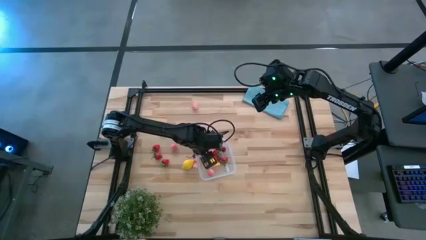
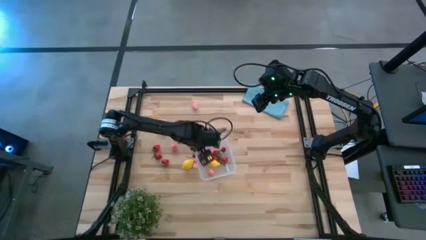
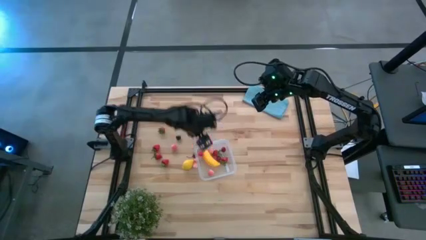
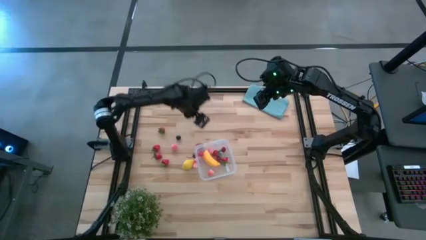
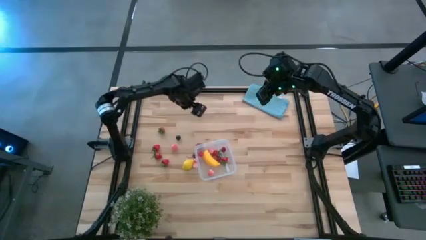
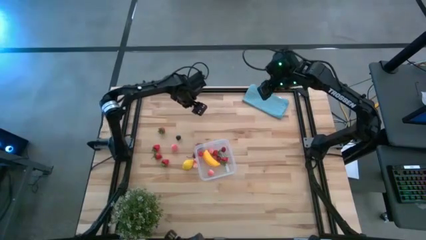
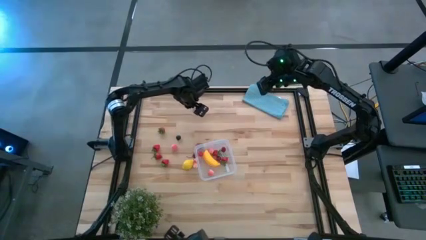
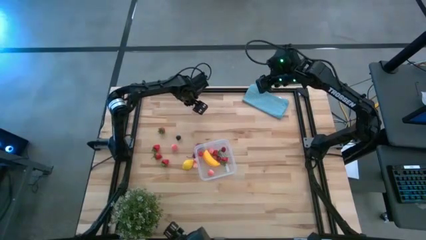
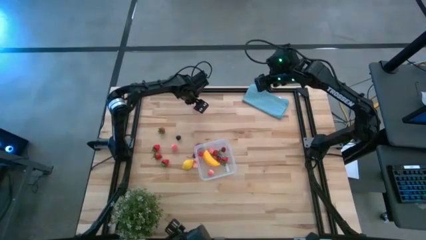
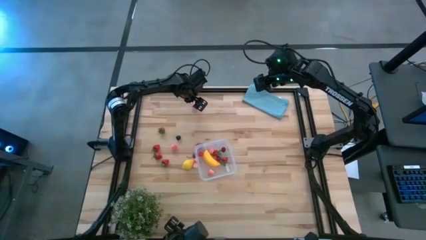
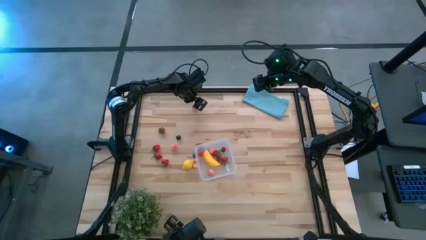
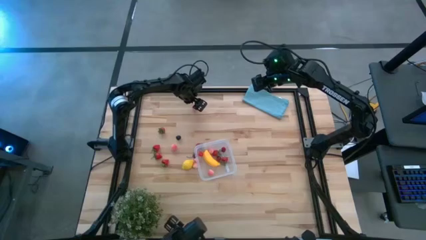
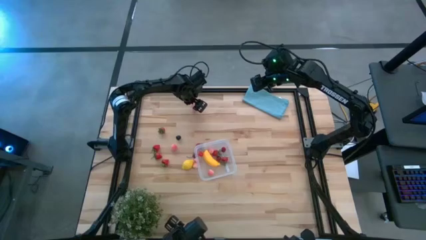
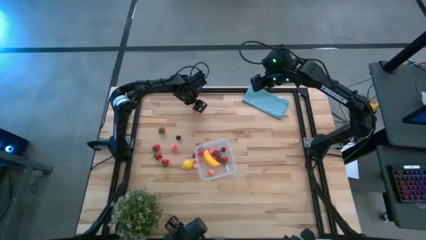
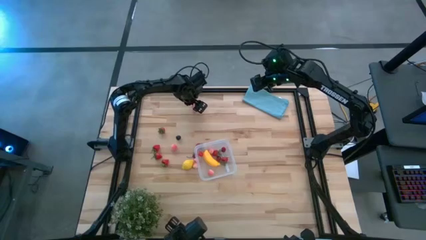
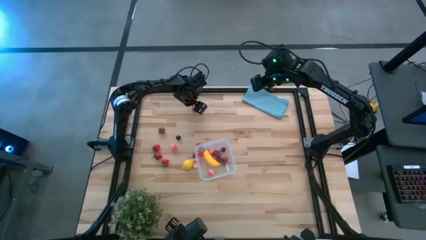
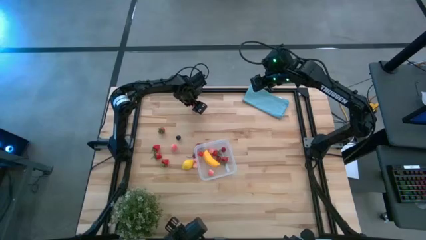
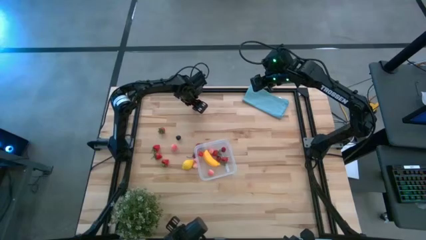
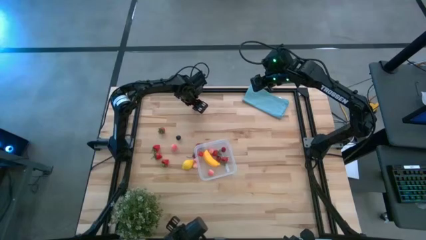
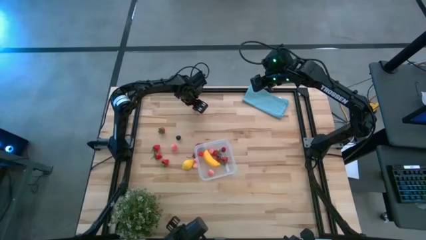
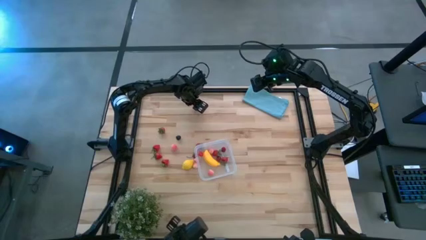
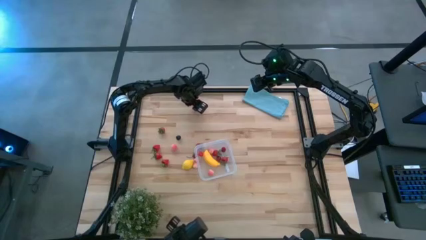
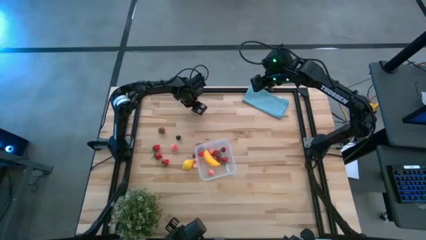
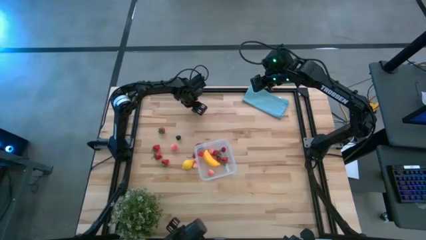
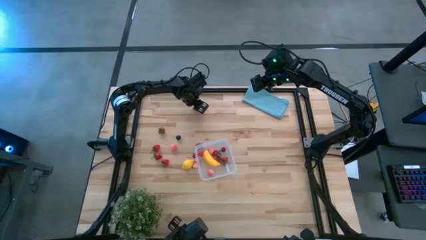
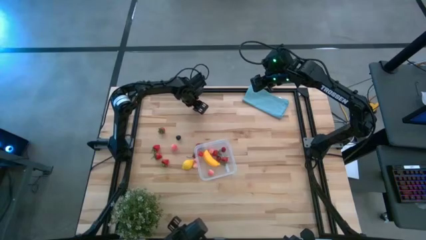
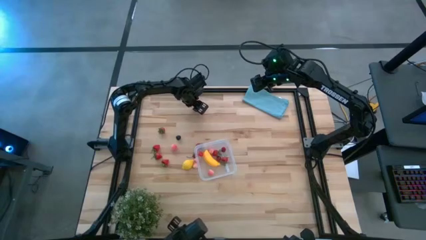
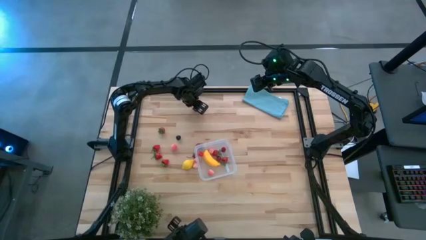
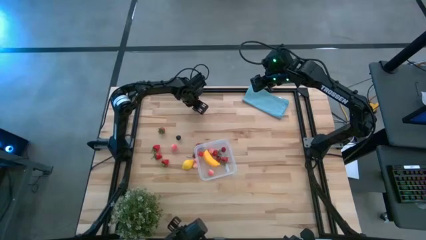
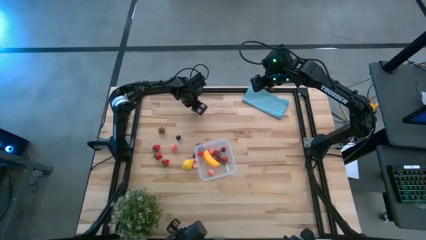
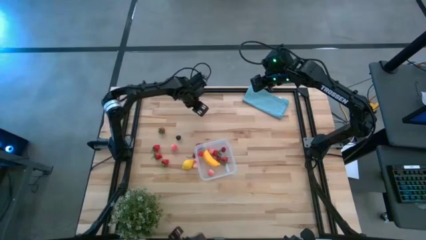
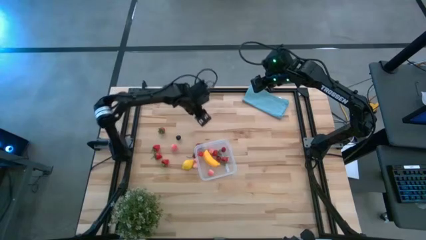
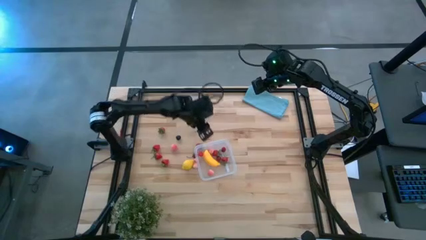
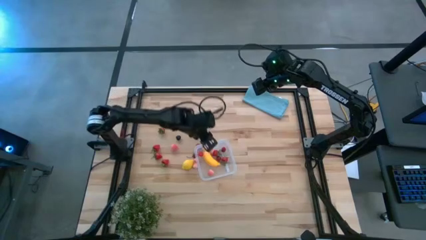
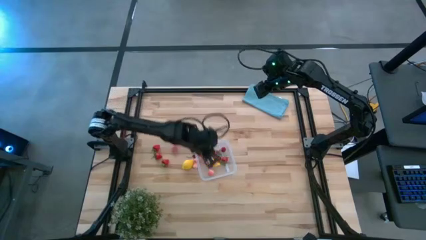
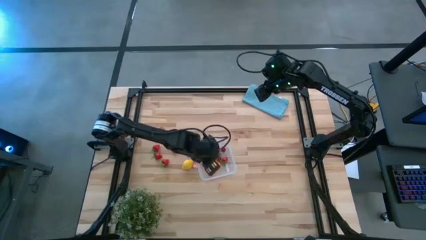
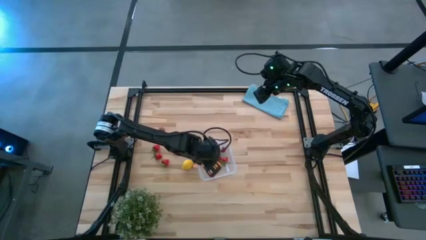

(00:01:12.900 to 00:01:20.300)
Task: Pick and placing Produce into tupperware
Put the pink peach into the transparent bin

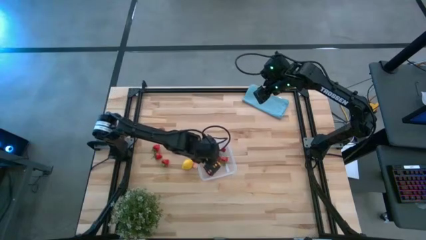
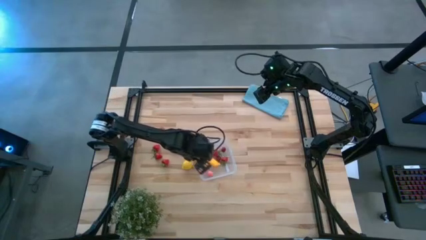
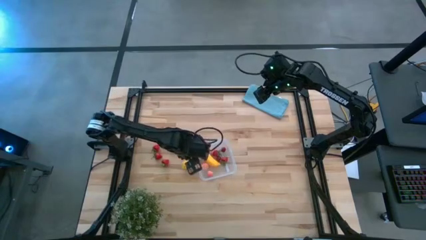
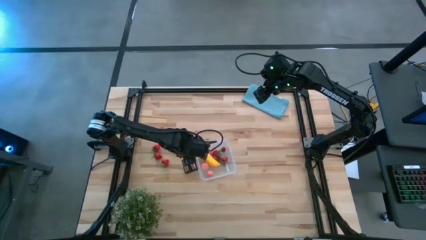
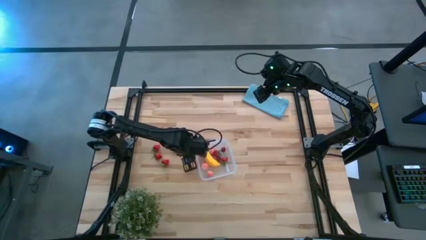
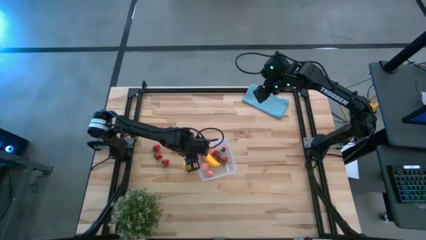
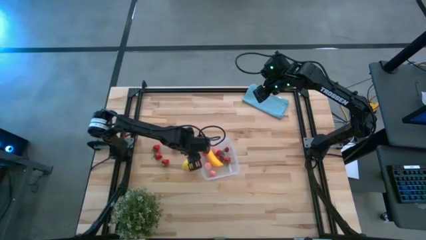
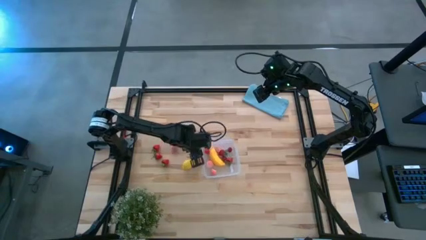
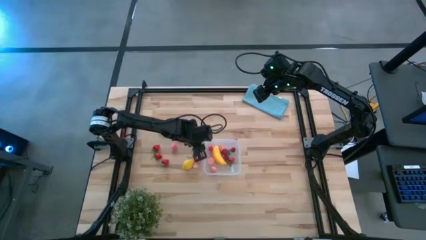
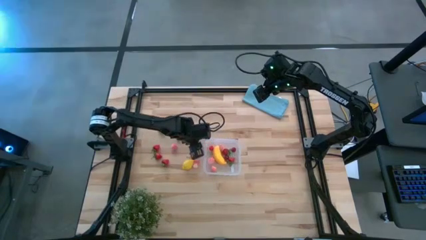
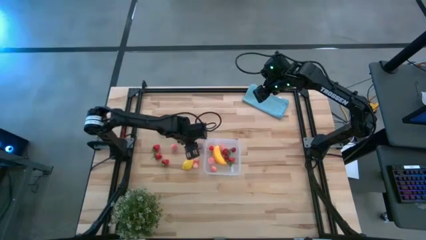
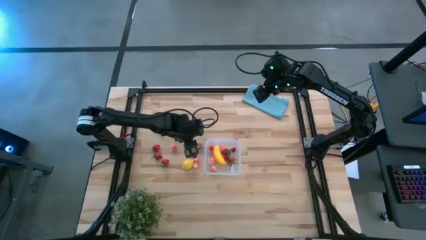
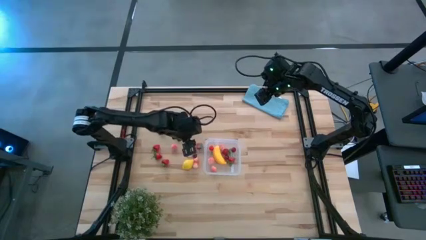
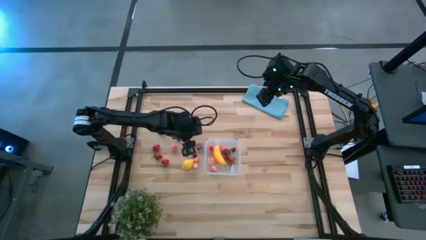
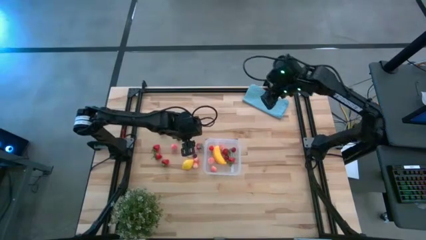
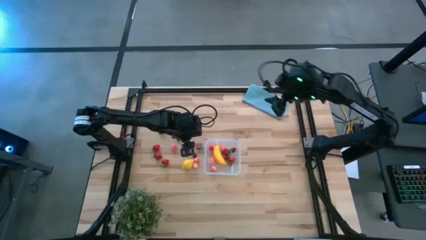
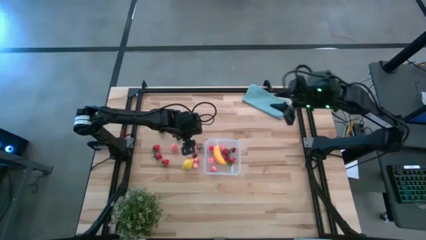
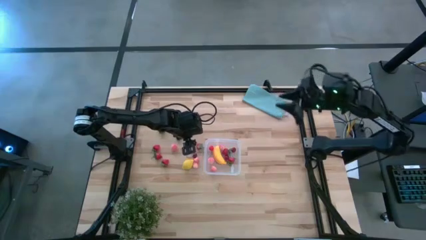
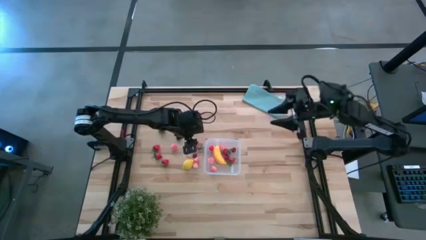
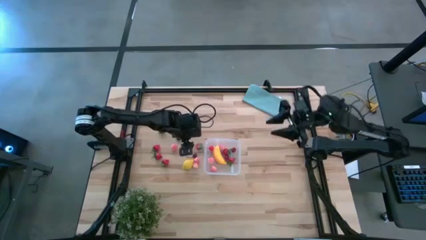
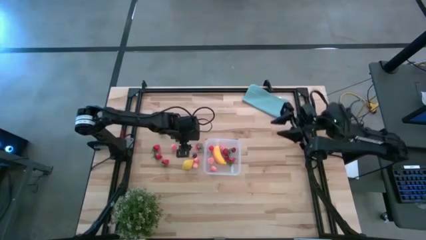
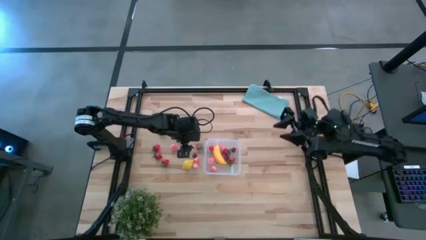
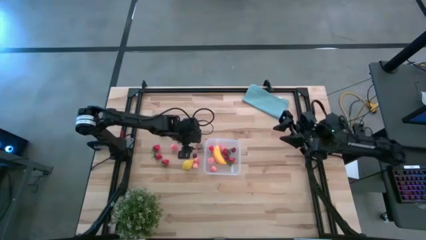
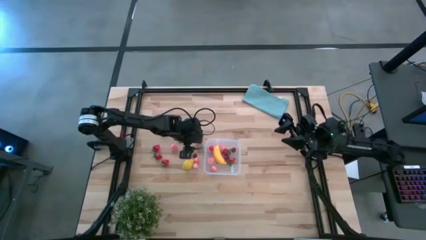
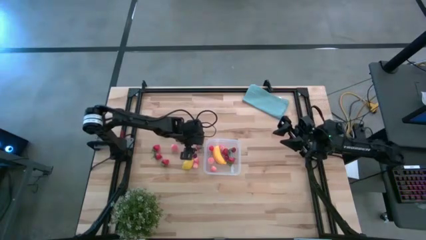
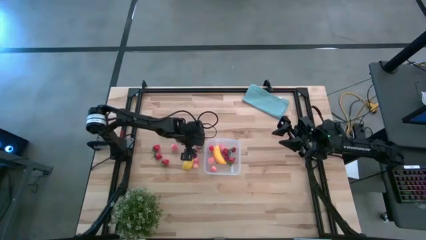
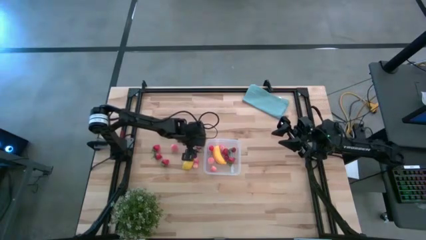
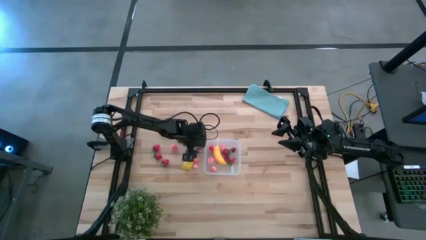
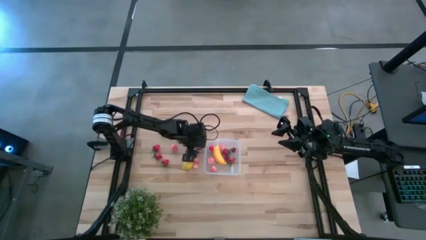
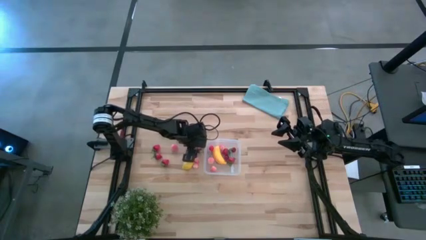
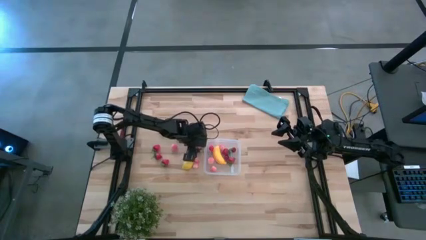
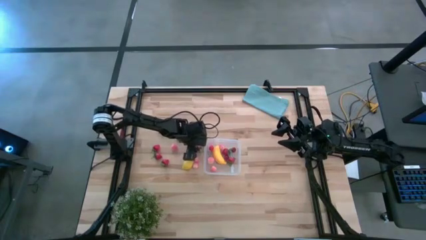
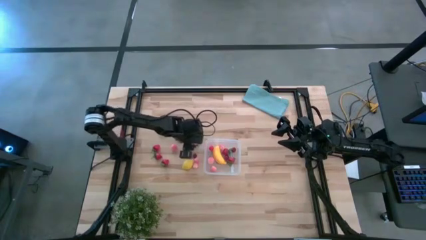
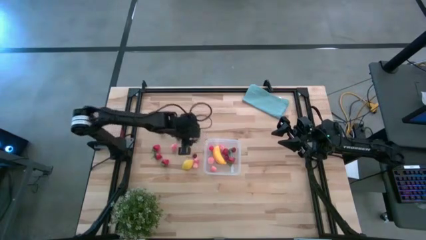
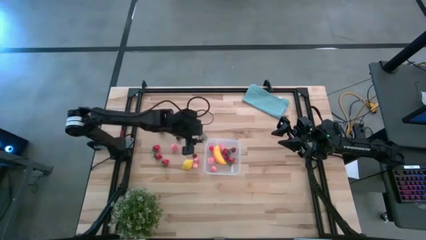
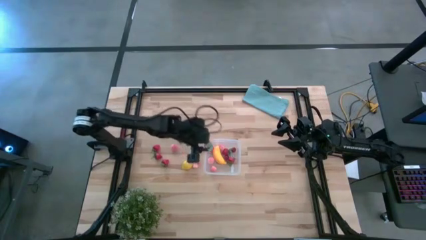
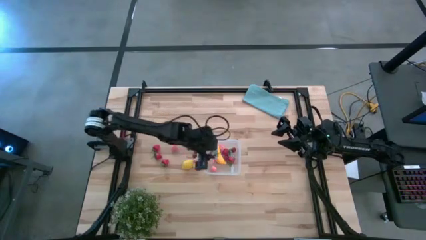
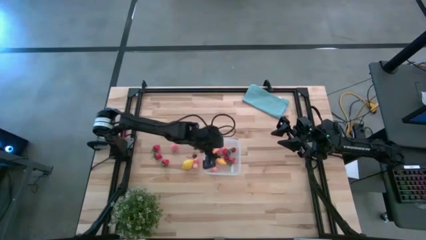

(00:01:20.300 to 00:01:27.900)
Put the red strawberry into the transparent bin

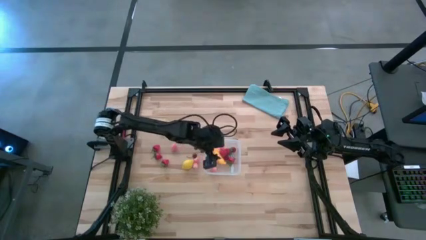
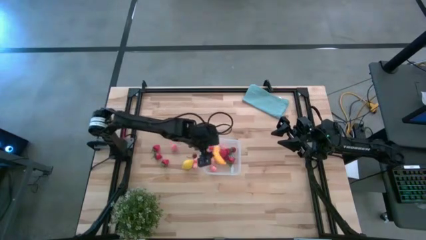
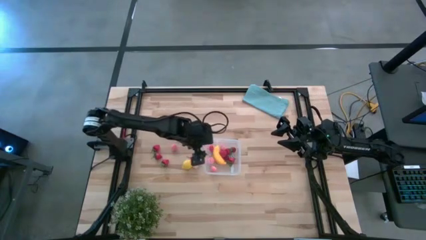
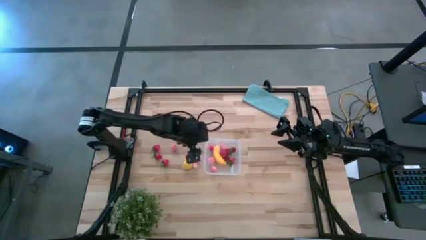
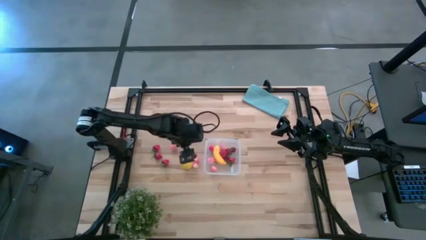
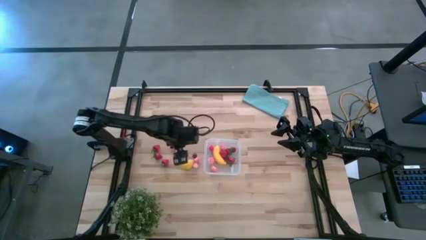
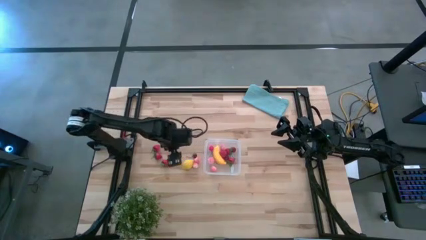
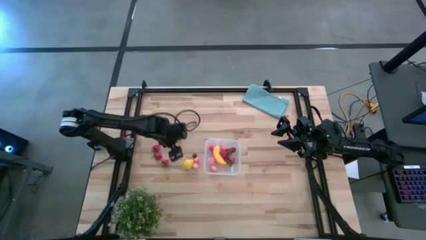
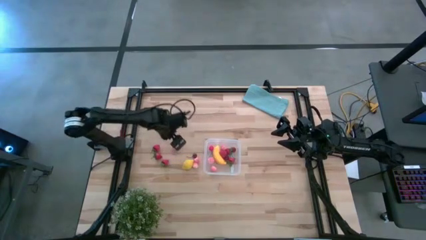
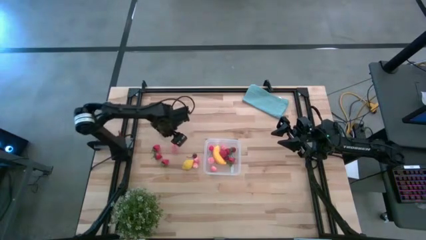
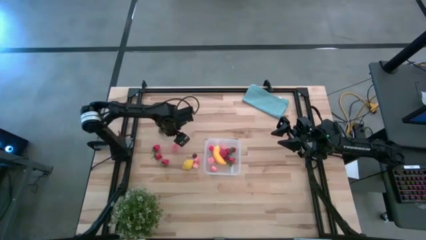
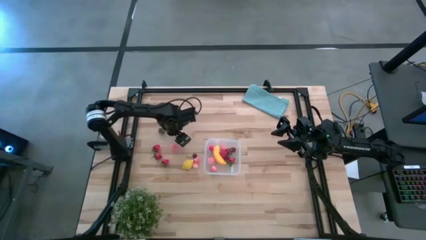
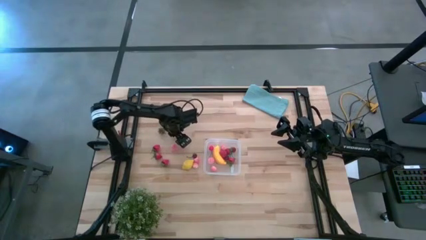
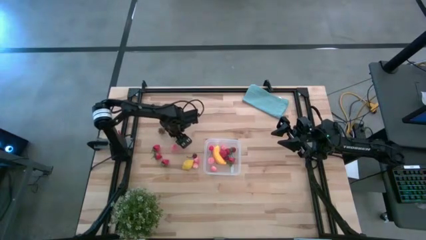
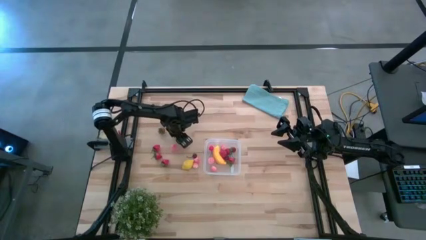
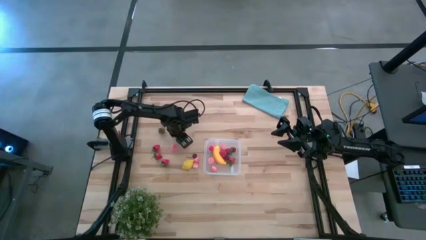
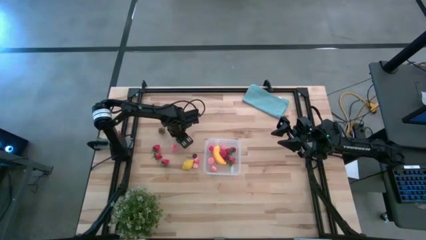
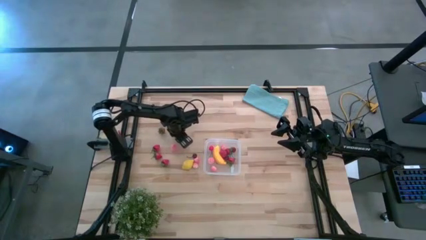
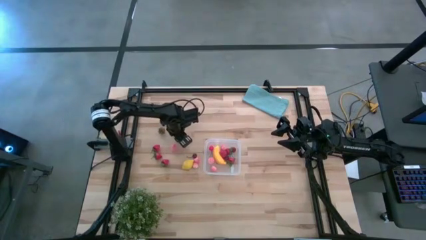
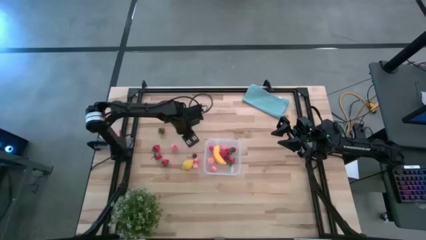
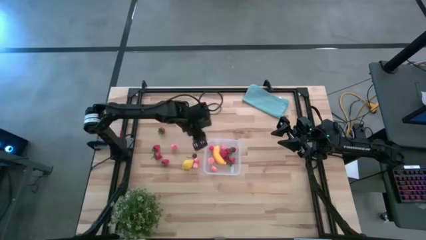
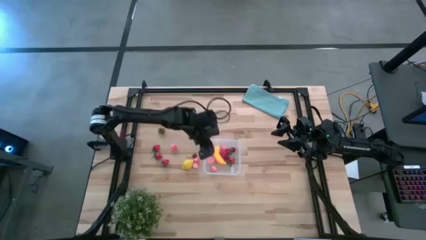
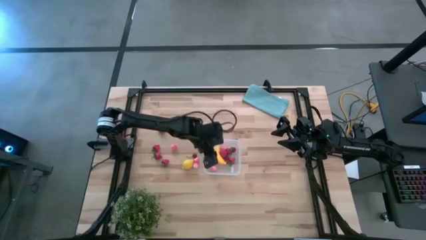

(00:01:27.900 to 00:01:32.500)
Put the blueberry into the transparent bin
